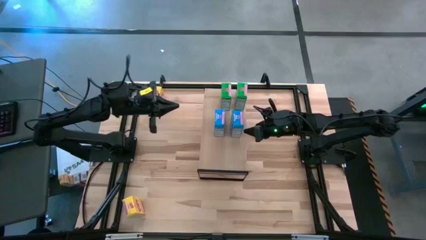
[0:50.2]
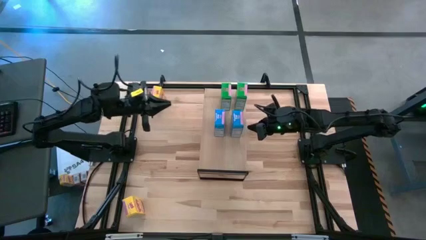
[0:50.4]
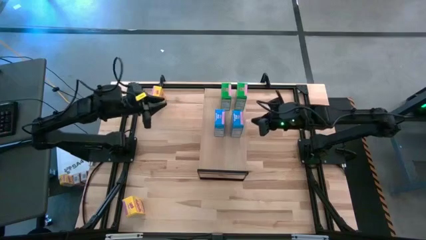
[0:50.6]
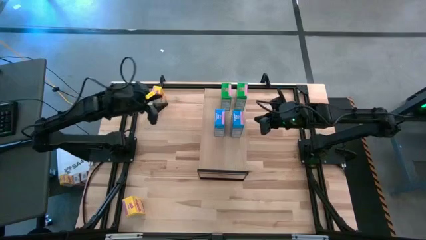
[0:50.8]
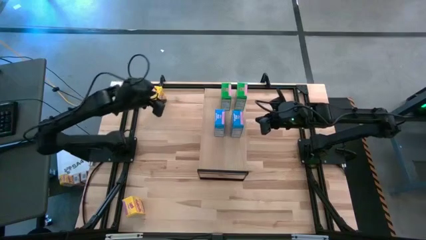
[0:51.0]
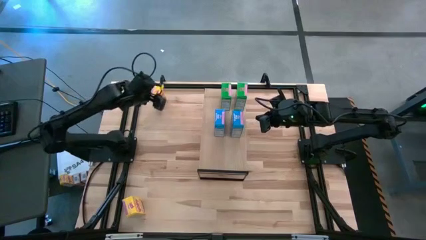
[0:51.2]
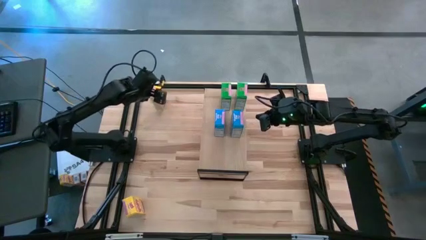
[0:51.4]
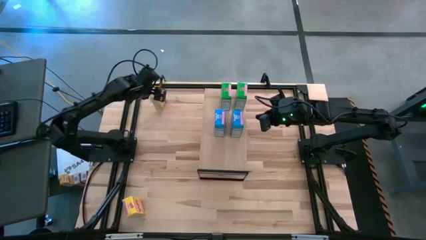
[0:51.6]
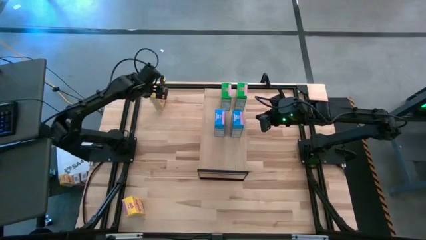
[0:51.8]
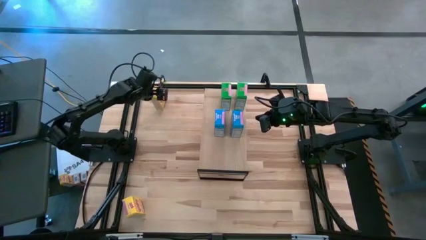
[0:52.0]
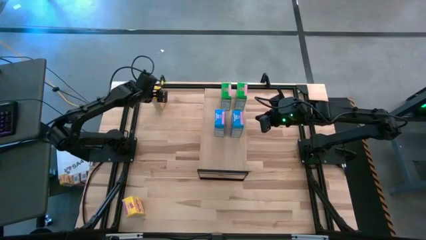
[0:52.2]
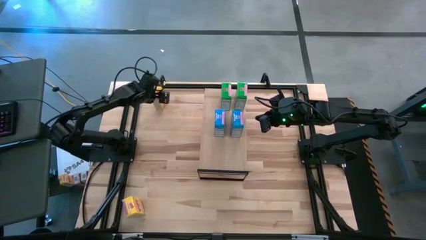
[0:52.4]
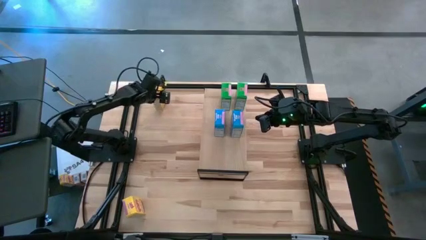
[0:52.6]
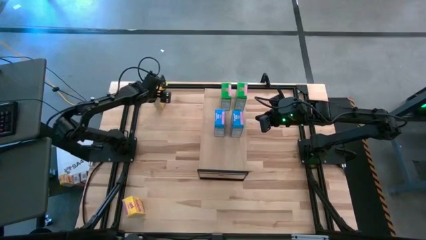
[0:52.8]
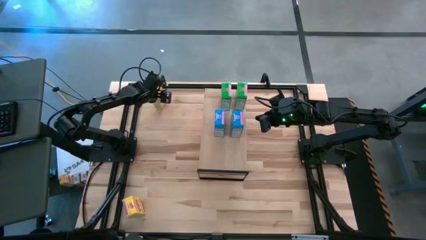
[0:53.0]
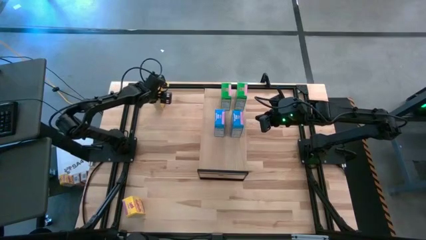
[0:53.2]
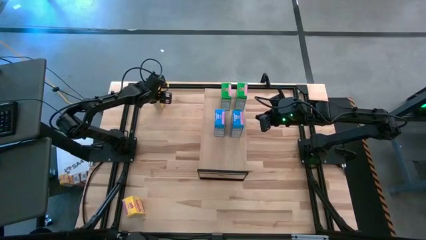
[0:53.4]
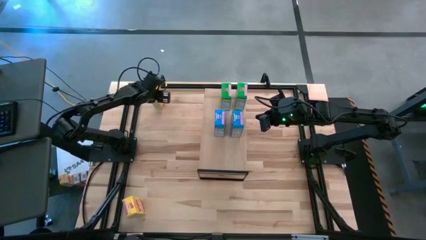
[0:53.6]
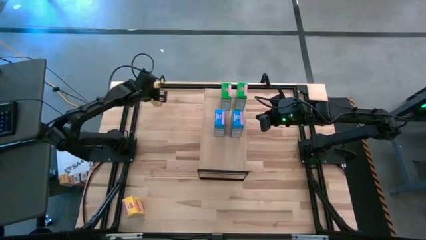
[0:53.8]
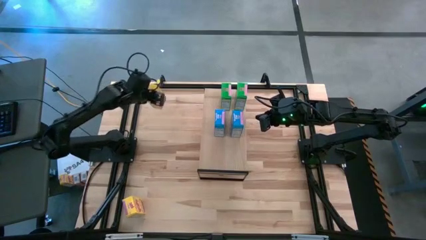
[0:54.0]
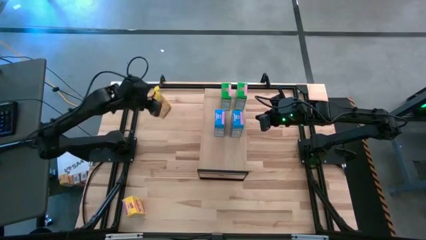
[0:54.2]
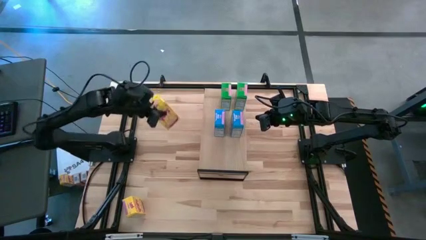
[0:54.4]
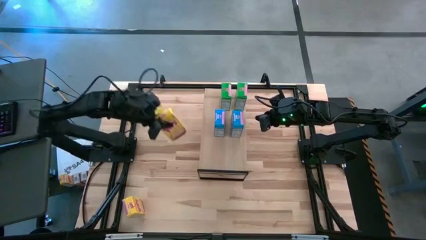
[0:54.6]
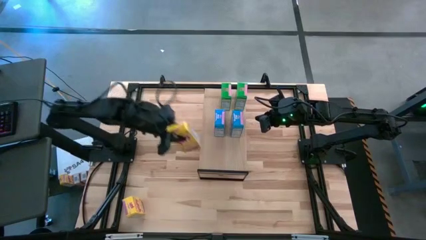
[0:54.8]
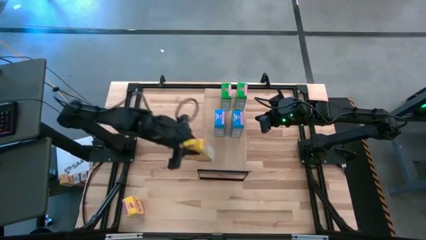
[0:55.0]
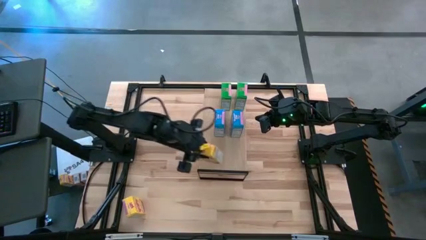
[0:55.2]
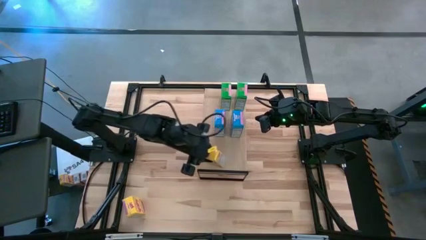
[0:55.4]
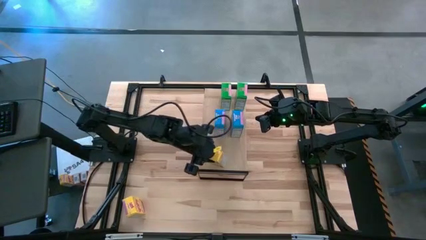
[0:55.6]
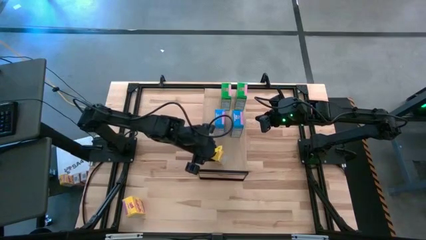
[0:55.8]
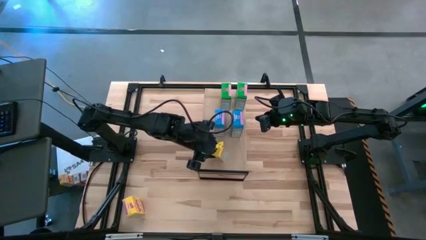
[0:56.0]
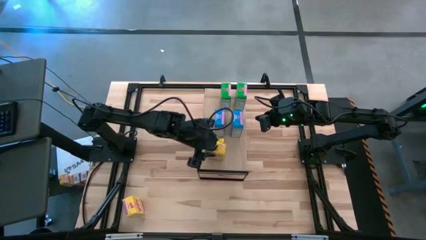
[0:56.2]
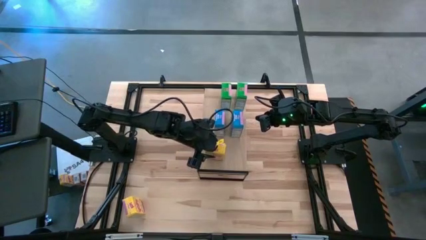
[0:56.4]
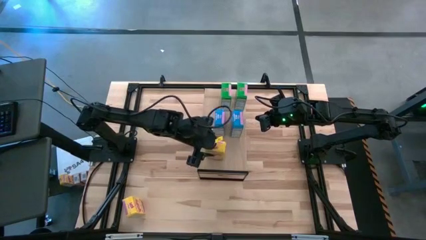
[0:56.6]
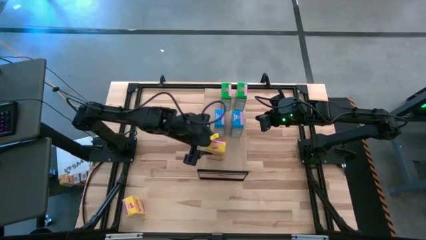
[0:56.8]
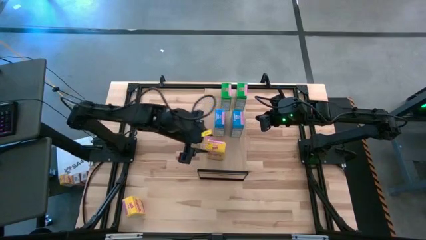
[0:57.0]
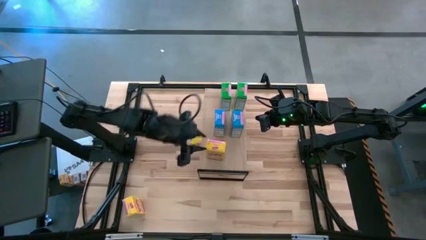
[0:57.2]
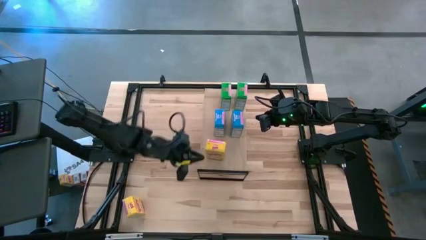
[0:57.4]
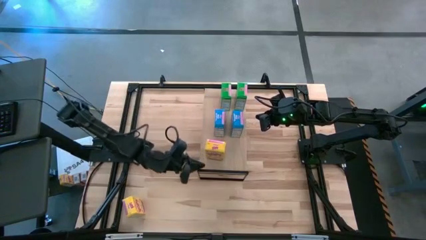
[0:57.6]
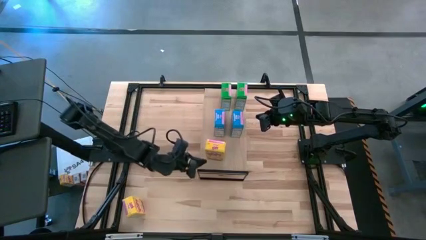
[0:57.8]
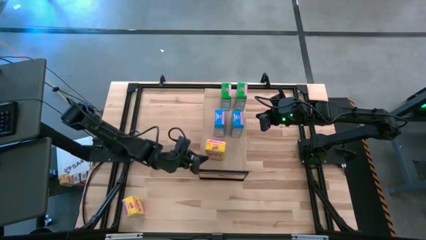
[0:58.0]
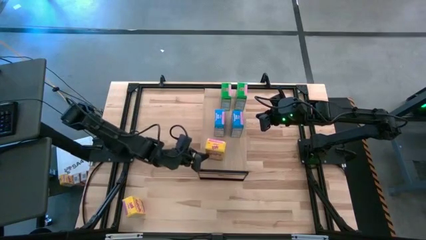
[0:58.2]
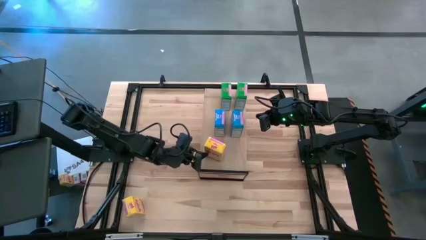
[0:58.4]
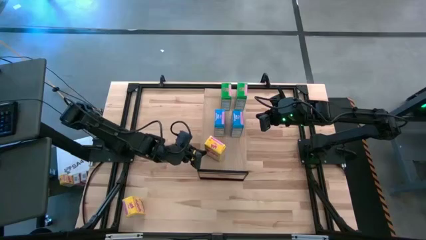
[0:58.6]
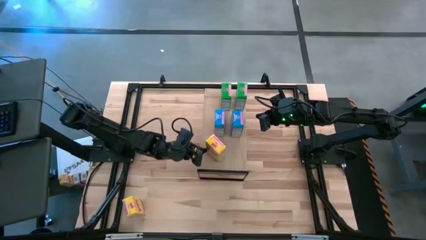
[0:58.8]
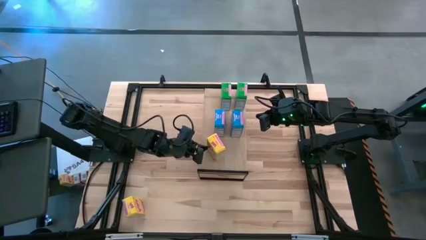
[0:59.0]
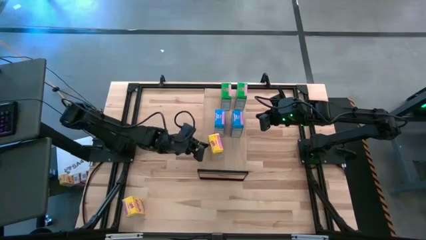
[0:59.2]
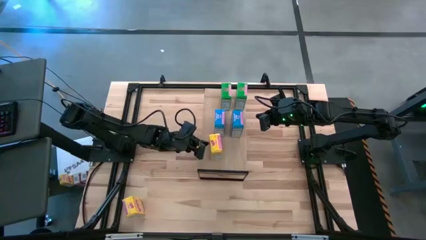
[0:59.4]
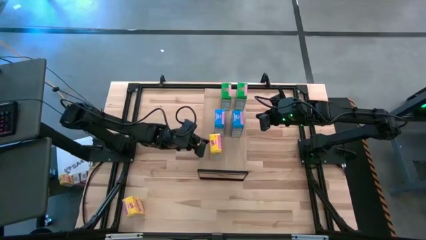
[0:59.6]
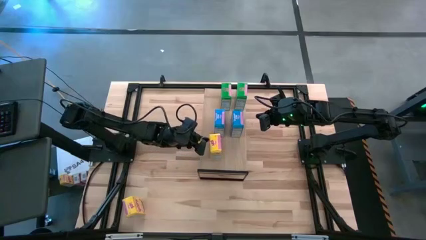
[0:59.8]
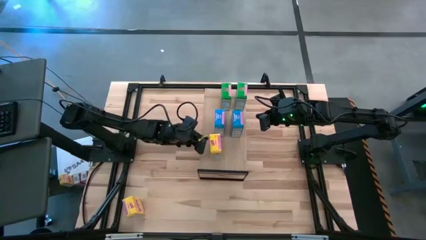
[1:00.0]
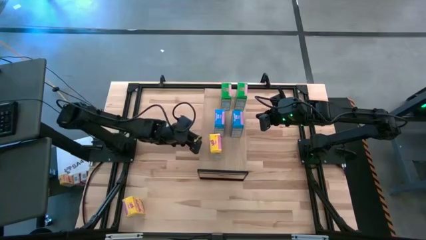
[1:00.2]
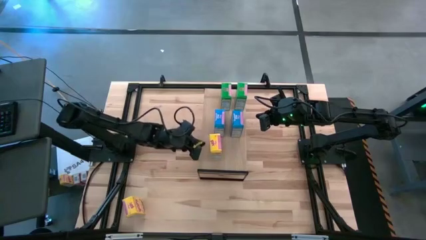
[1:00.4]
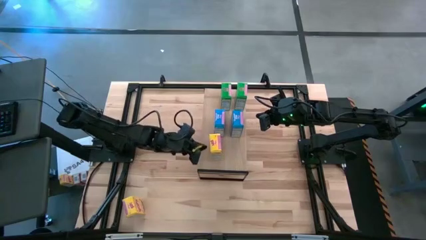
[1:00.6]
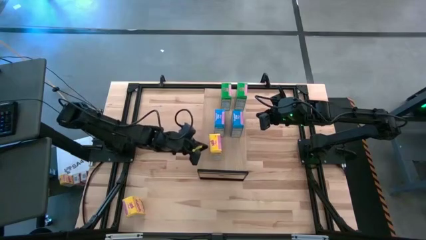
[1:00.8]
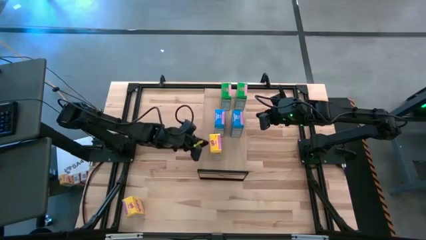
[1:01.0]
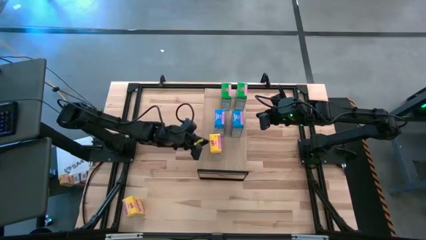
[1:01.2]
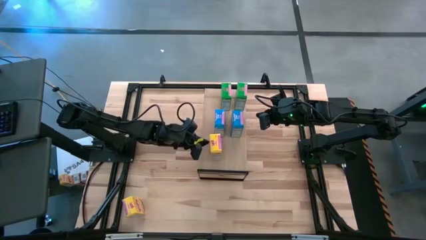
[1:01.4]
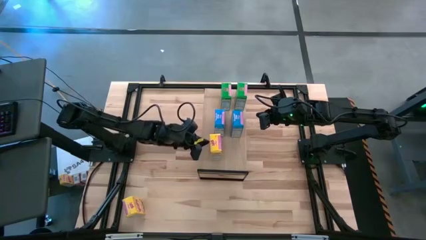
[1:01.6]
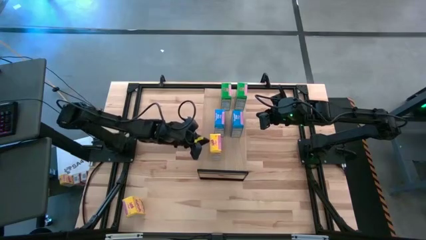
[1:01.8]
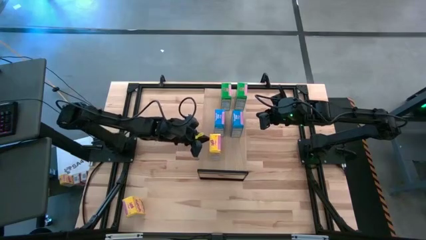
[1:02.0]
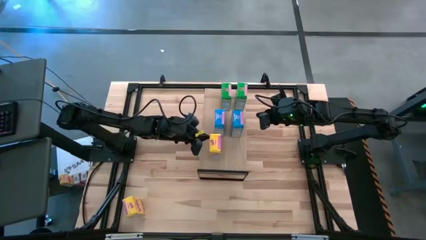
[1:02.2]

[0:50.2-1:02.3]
Task: Stack cereal on shelf
Put the top yellow cereal box on the shelf
